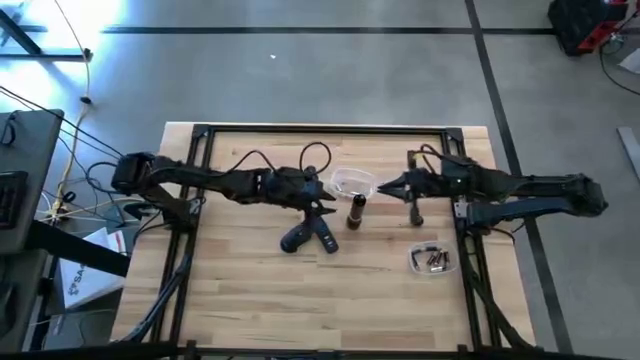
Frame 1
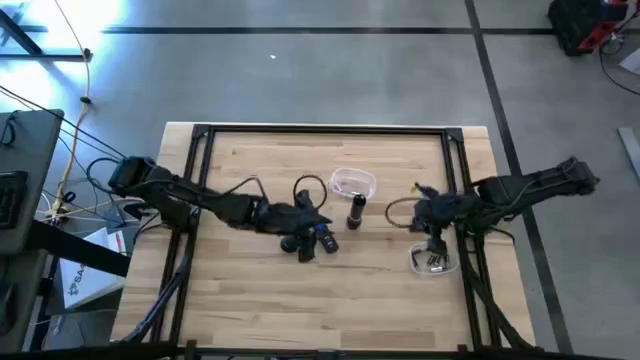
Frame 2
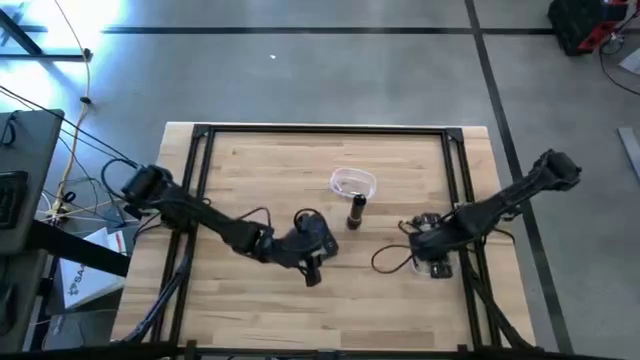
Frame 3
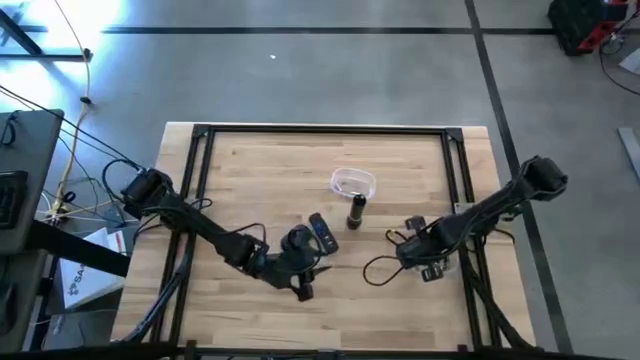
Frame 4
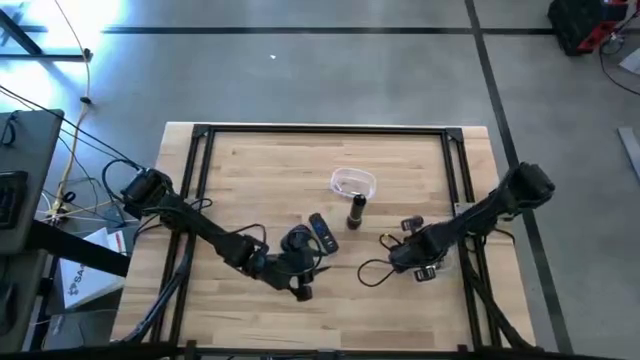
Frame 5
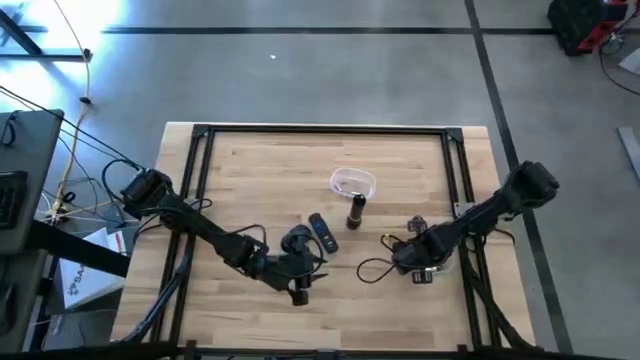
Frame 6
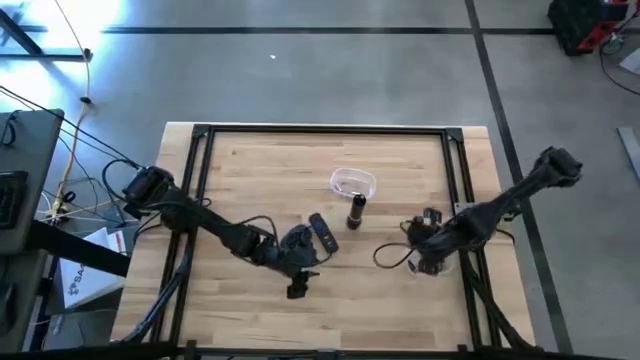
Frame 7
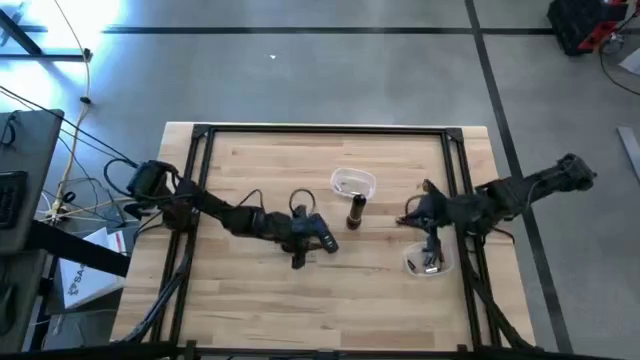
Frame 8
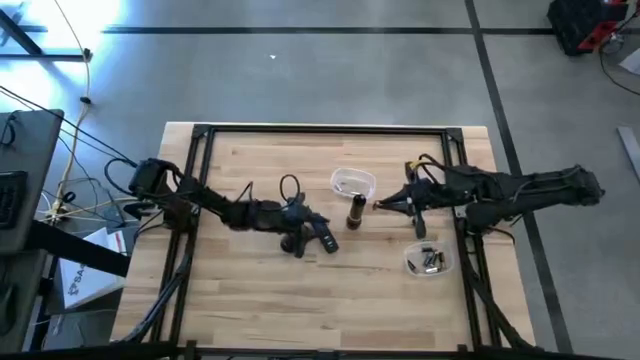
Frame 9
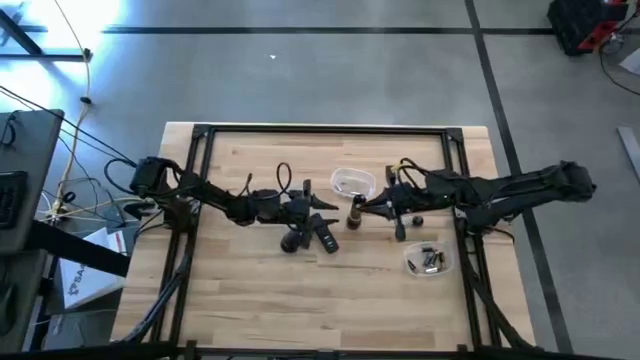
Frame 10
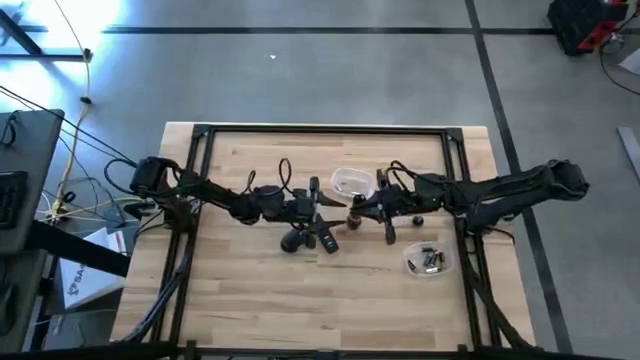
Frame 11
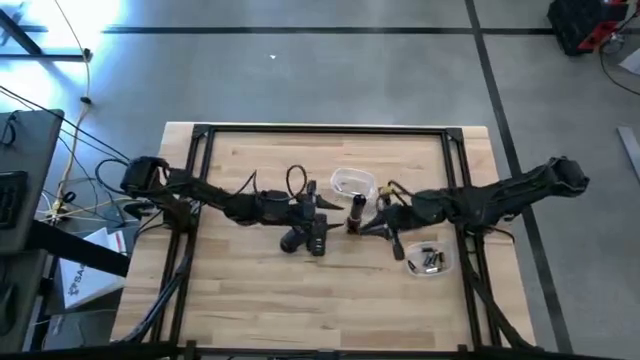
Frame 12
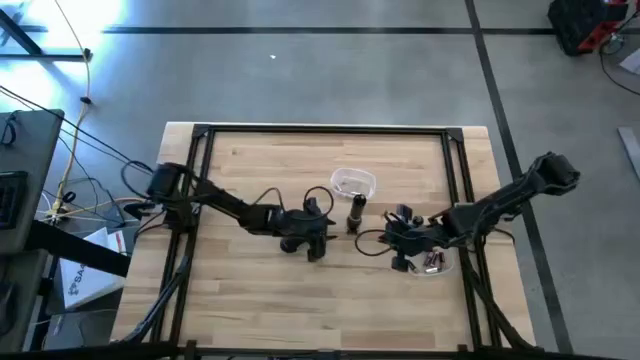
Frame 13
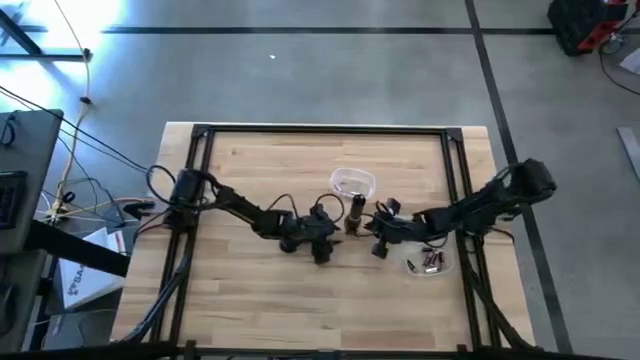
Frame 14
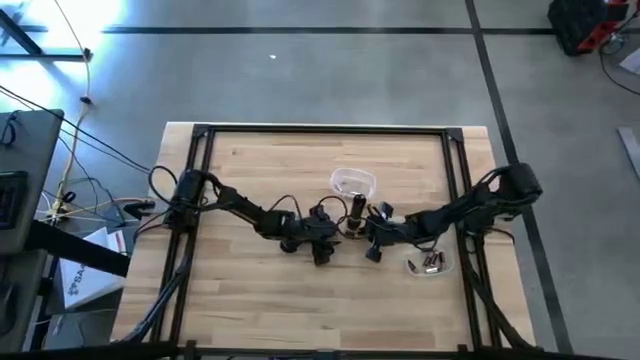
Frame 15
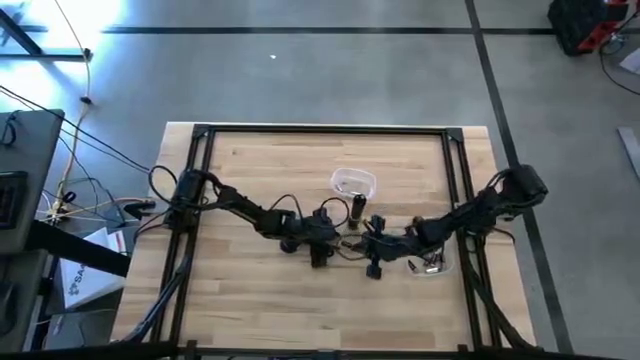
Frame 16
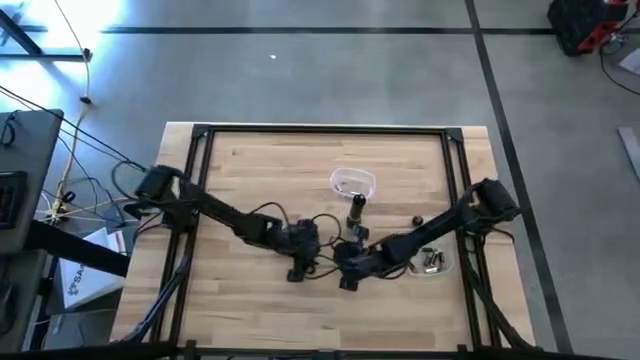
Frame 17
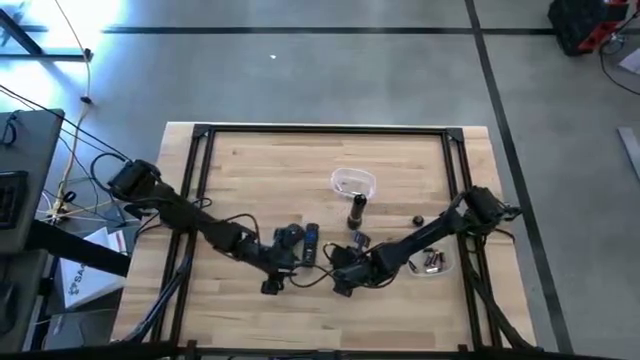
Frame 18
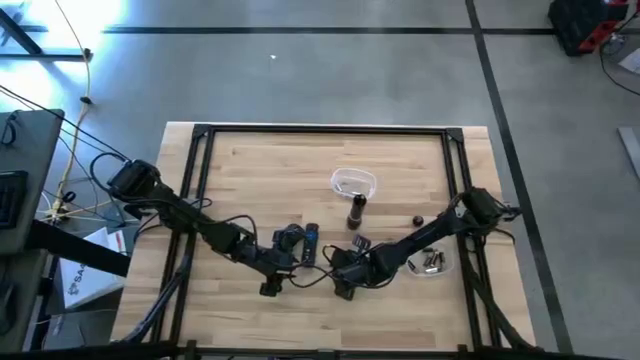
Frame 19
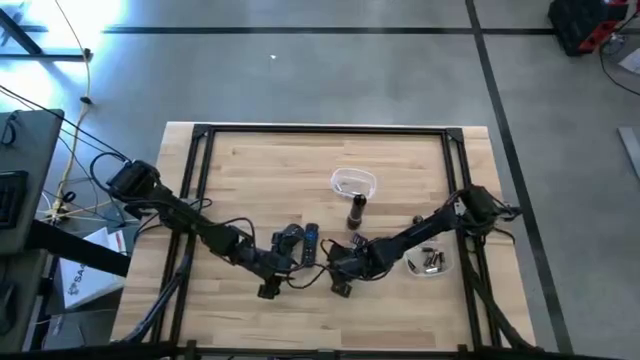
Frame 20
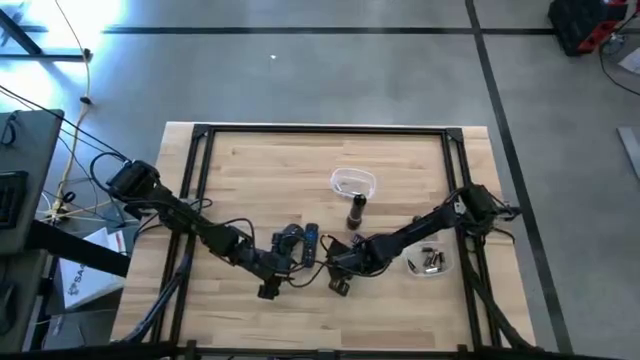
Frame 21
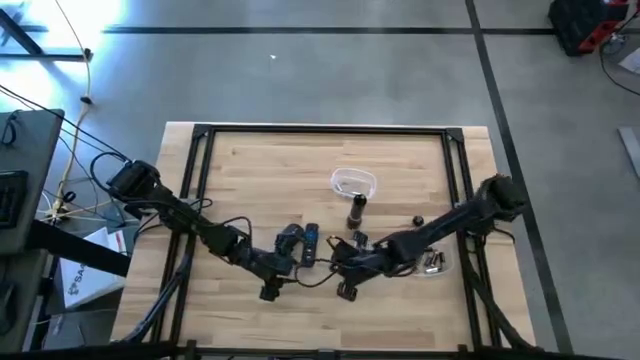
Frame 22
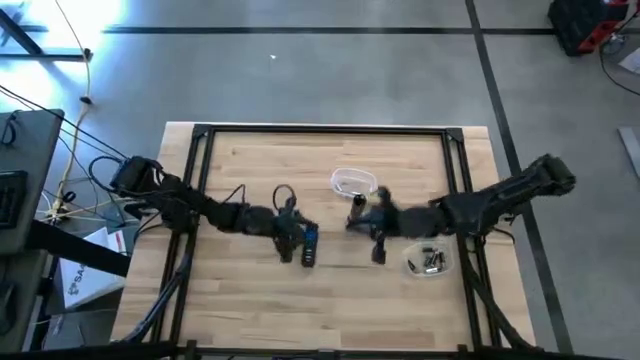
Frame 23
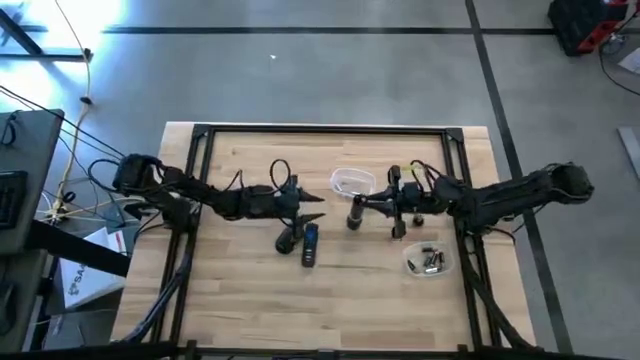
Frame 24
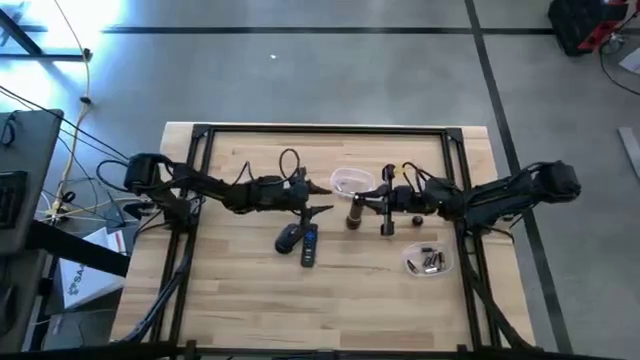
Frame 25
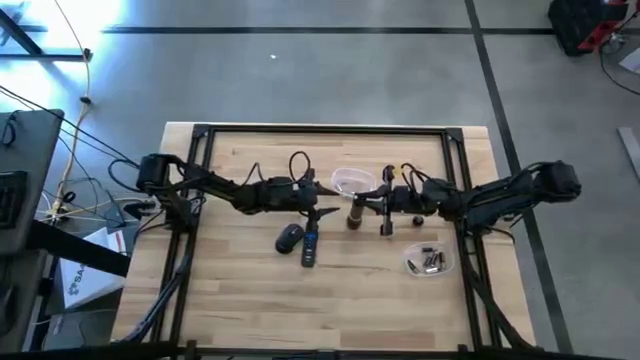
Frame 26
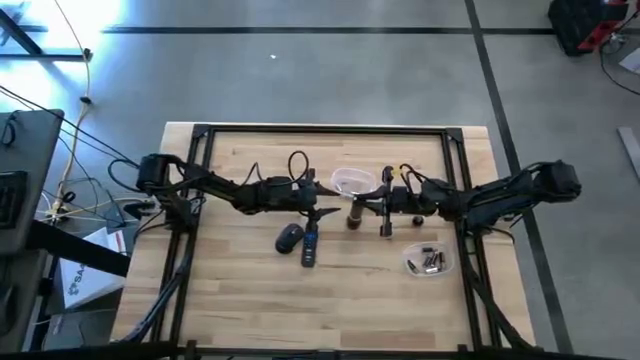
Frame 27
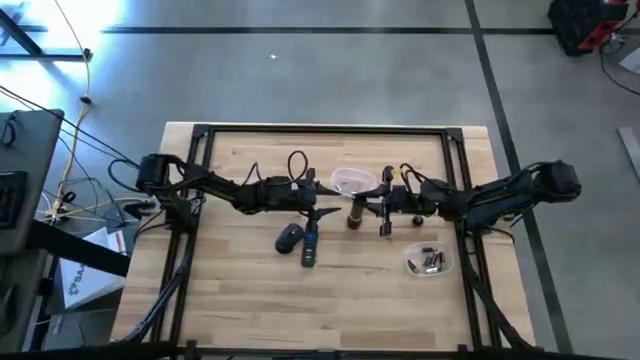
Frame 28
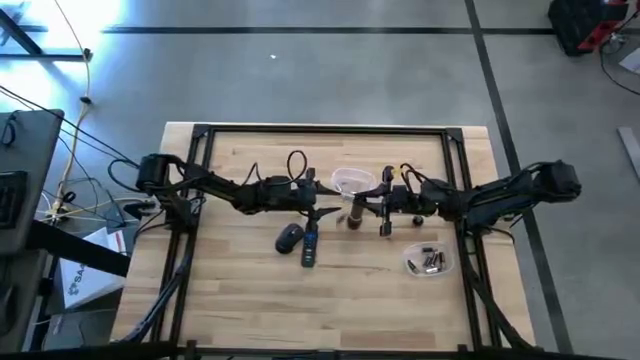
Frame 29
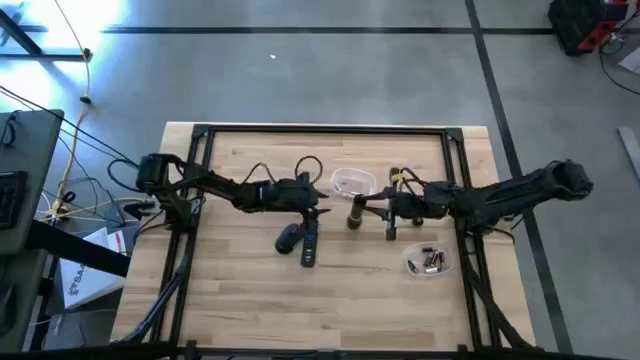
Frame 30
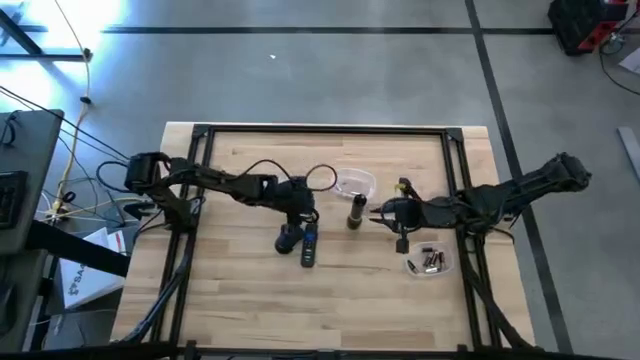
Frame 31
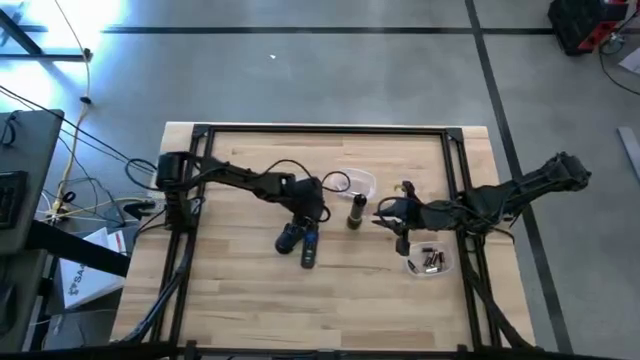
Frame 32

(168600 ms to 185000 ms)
Task: Insert battery
Insert the black battery into the flashlight

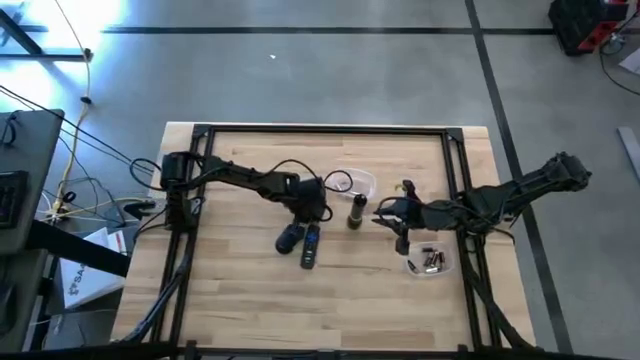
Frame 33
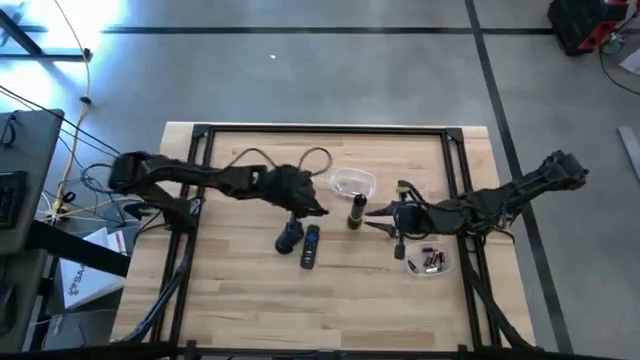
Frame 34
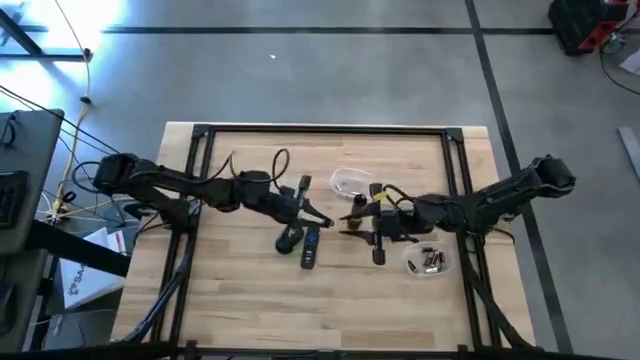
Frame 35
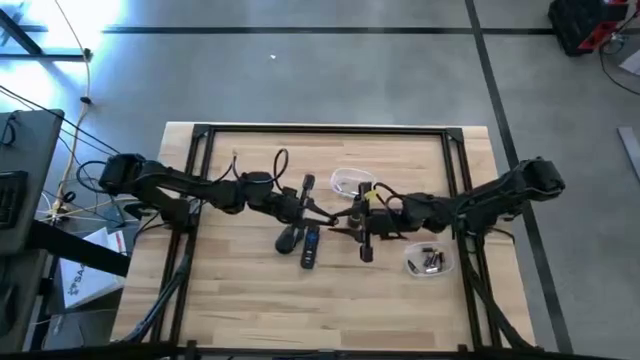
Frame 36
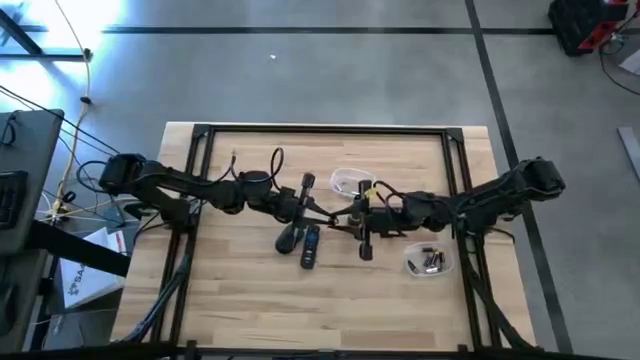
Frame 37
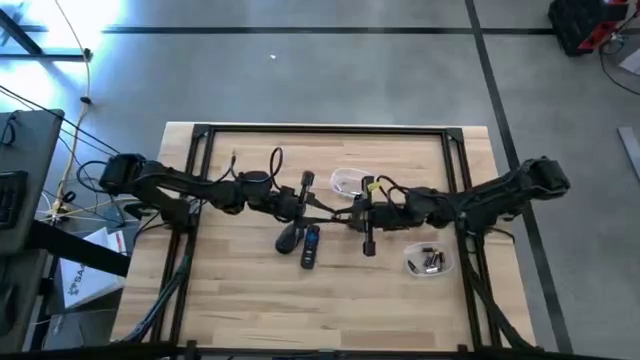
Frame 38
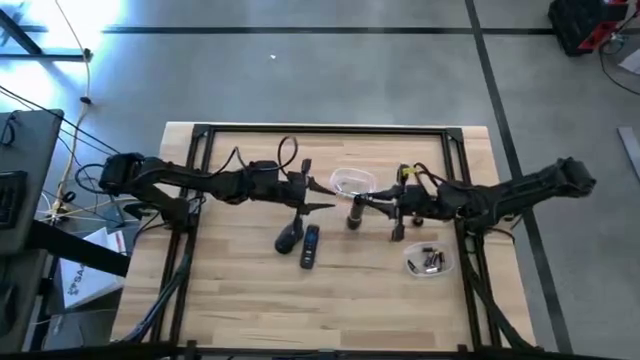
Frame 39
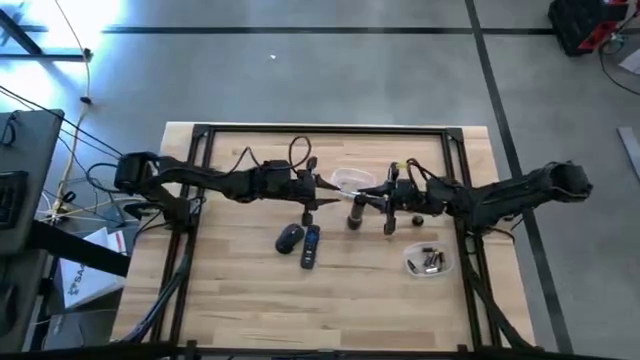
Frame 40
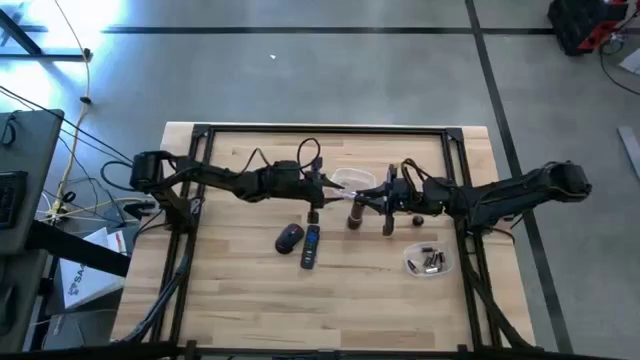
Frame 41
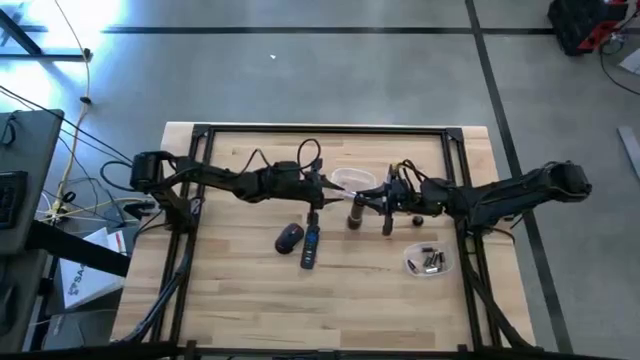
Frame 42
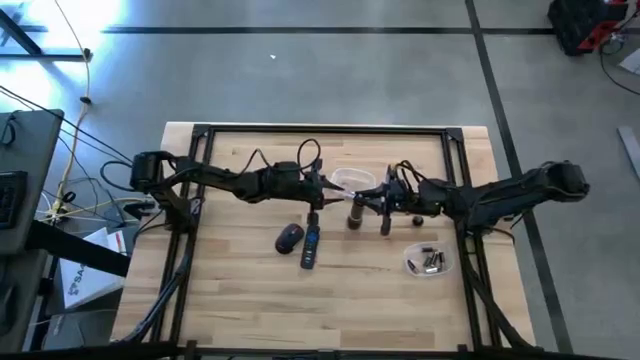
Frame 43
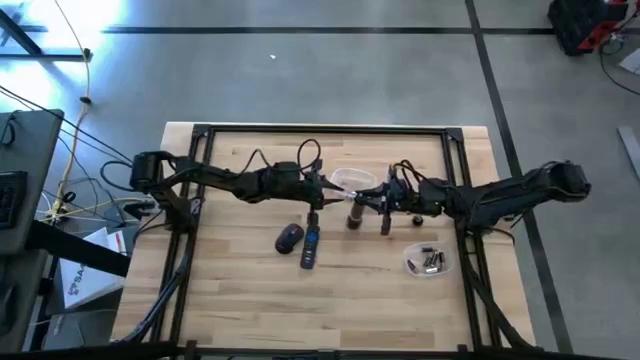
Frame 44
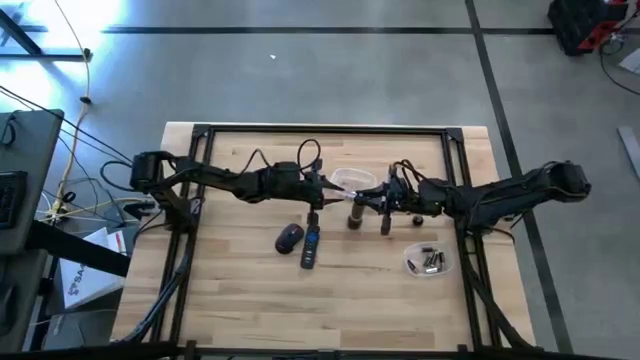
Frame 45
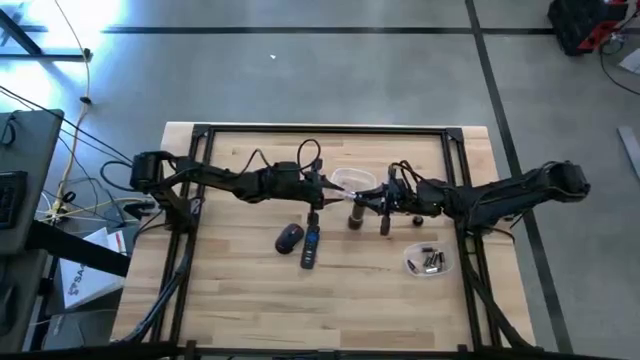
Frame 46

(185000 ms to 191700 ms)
Insert the black battery into the flashlight
